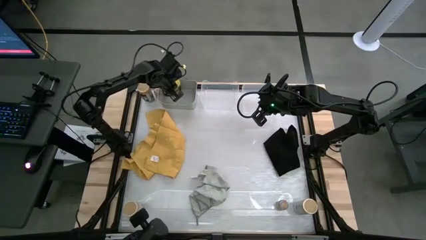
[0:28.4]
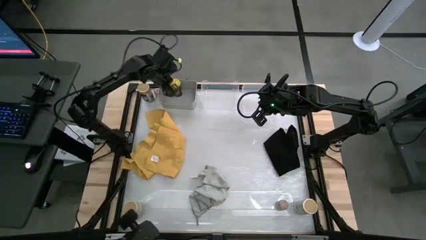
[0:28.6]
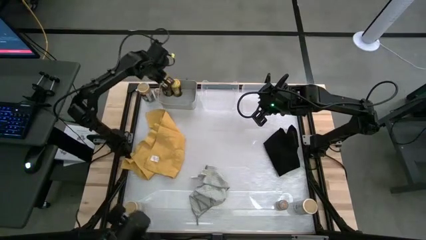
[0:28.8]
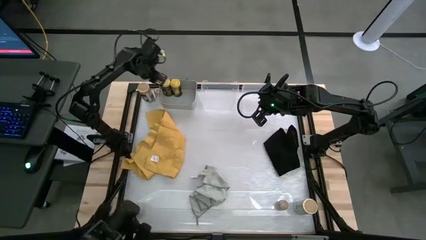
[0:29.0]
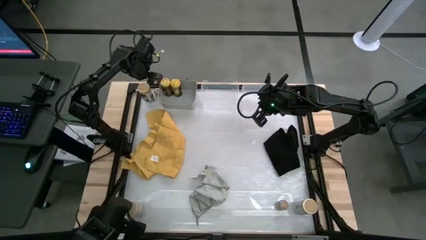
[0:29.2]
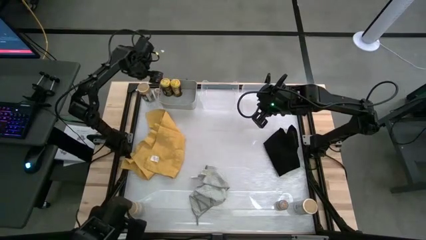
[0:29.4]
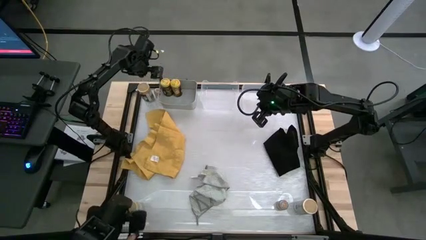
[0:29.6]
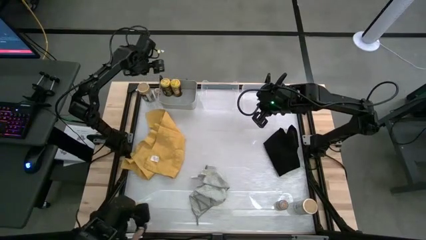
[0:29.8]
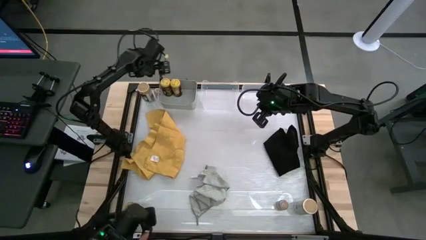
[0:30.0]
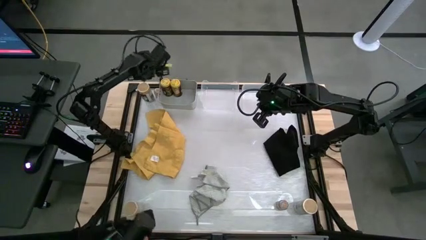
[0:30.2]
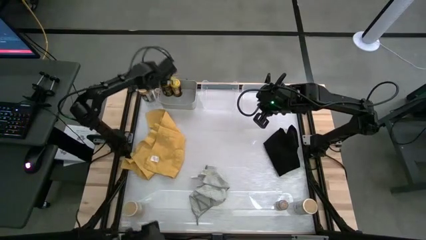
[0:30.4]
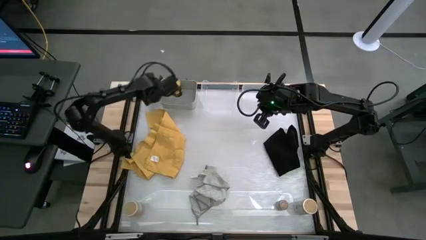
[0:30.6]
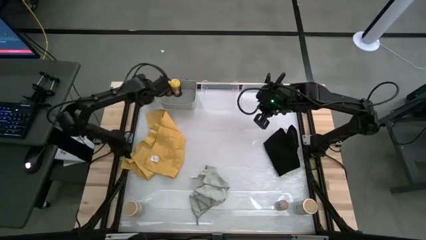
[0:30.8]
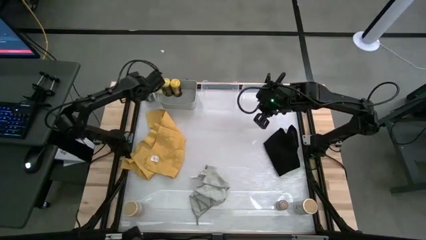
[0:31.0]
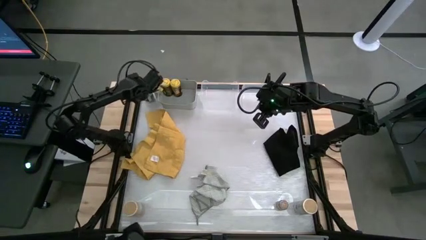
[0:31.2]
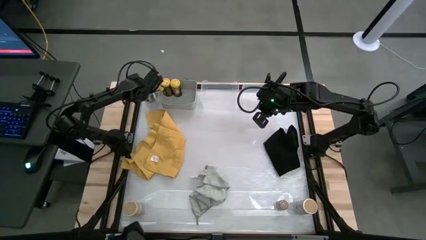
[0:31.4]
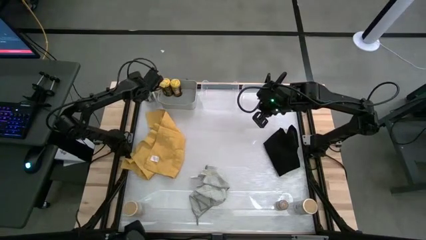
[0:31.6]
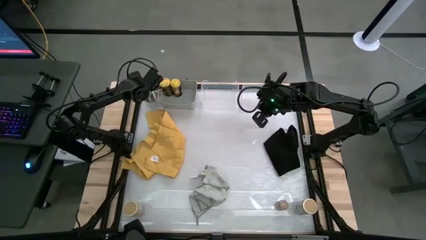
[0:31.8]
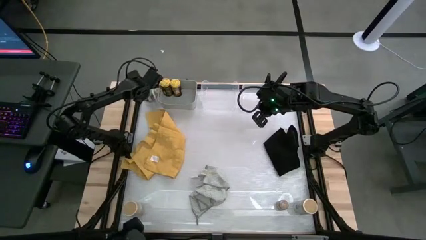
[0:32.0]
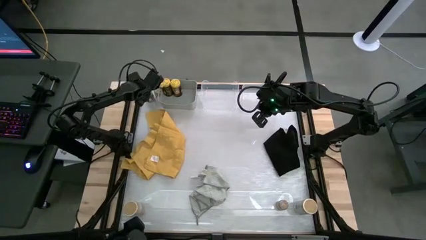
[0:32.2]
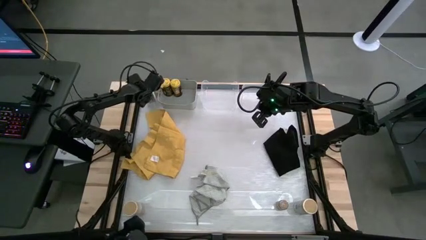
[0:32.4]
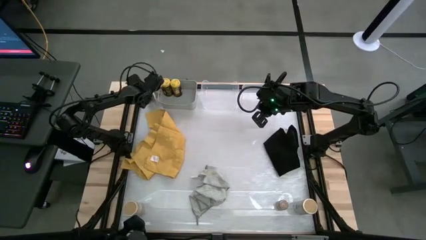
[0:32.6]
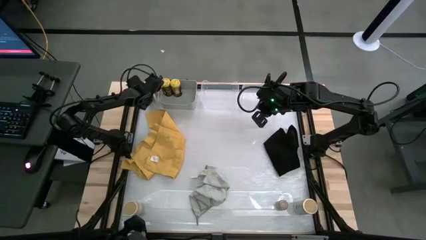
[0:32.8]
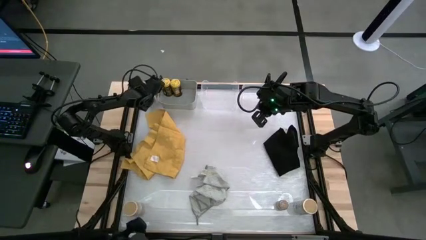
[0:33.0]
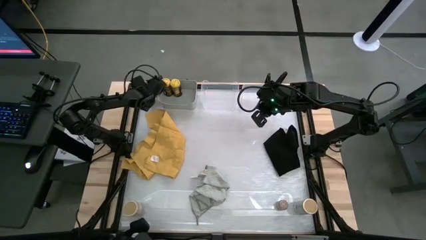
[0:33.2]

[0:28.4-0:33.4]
Task: Sort spices by type
Put the top left gold seasoning bottle into the right transparent bin

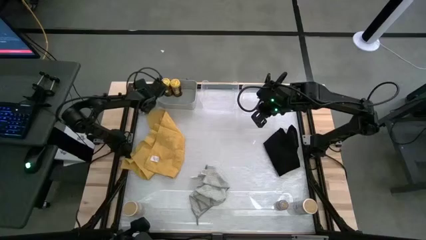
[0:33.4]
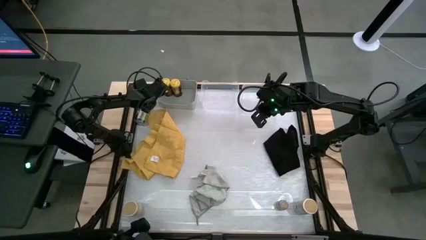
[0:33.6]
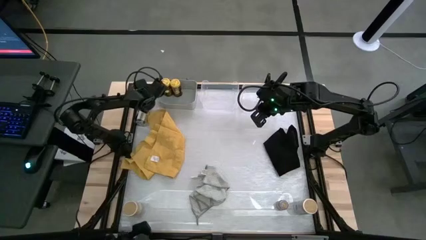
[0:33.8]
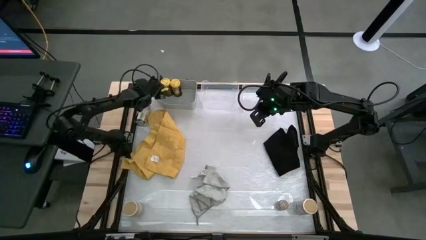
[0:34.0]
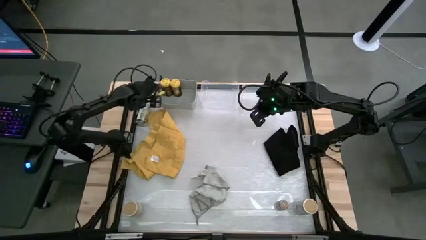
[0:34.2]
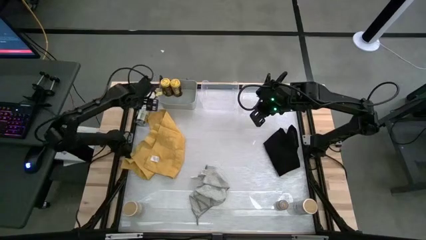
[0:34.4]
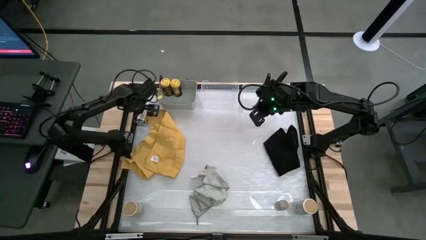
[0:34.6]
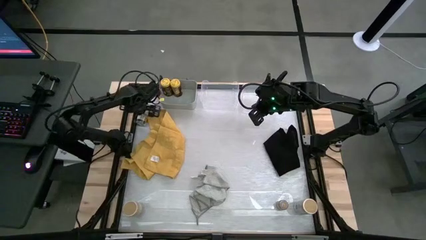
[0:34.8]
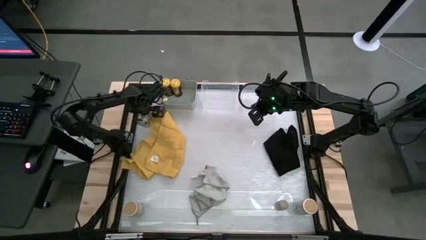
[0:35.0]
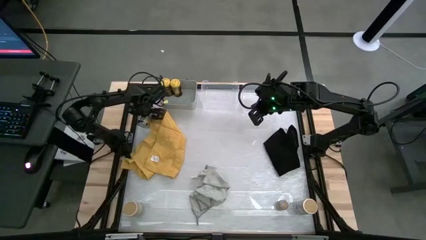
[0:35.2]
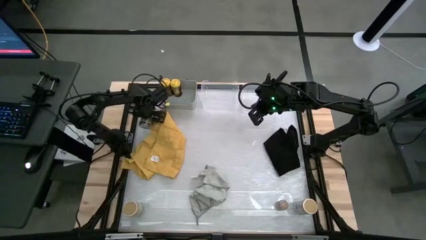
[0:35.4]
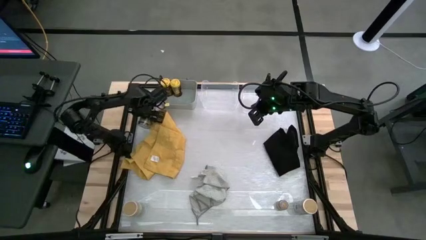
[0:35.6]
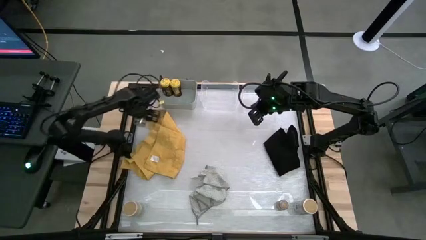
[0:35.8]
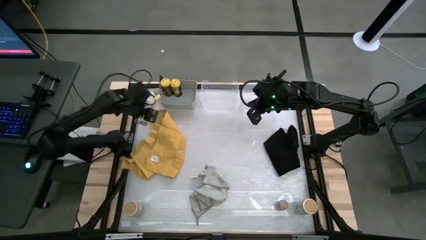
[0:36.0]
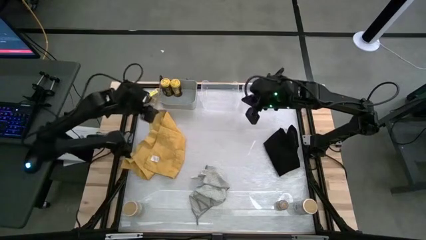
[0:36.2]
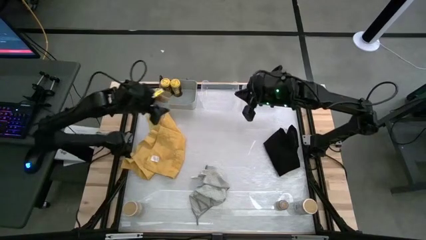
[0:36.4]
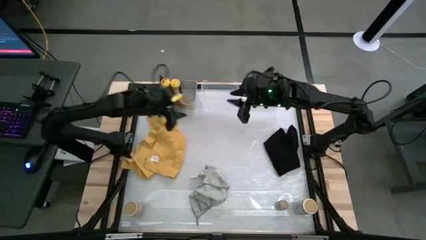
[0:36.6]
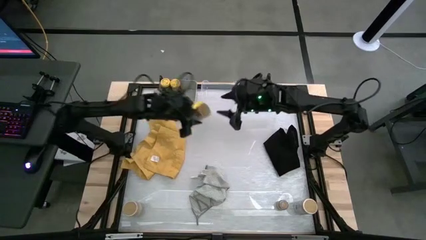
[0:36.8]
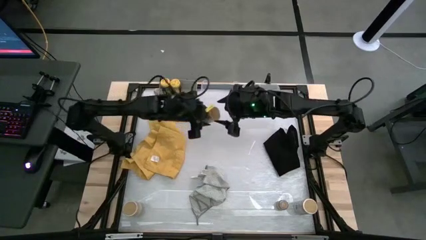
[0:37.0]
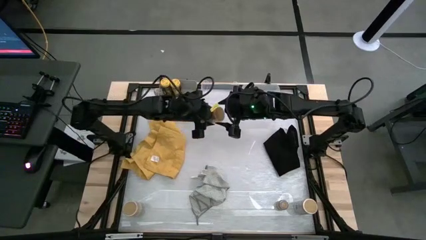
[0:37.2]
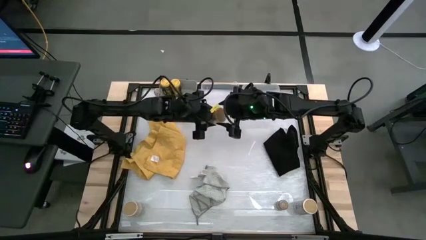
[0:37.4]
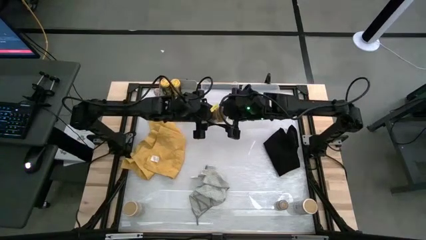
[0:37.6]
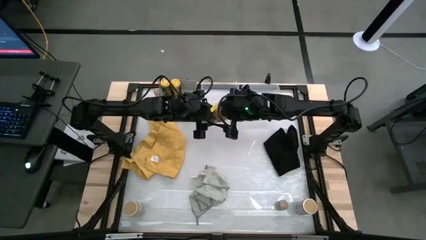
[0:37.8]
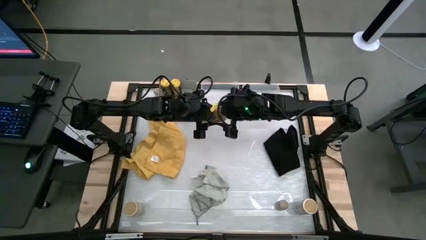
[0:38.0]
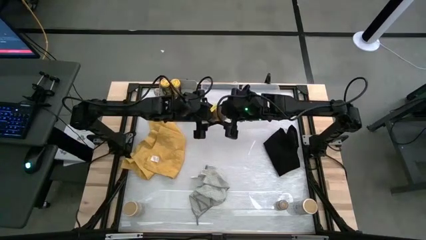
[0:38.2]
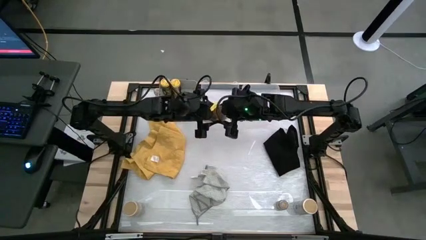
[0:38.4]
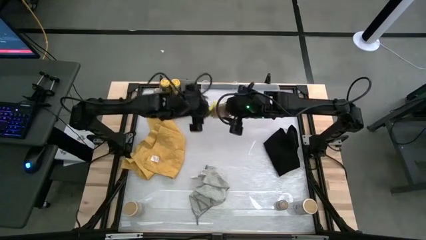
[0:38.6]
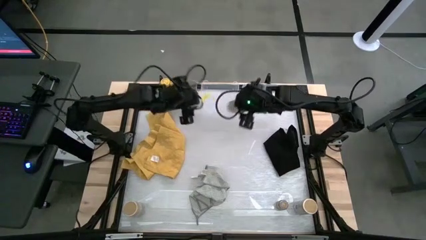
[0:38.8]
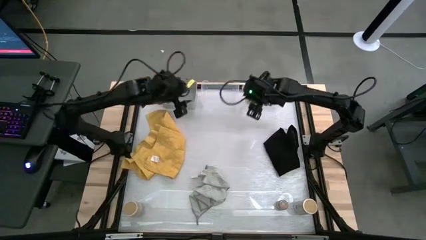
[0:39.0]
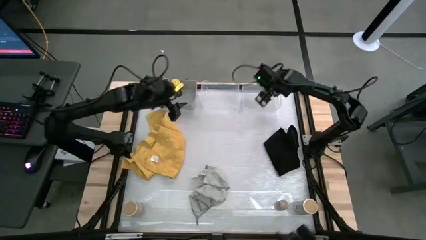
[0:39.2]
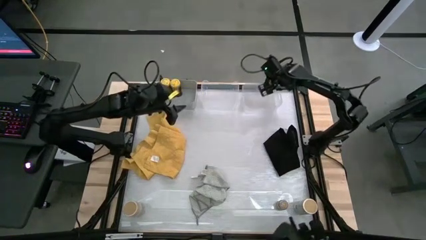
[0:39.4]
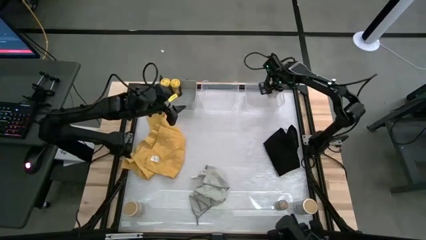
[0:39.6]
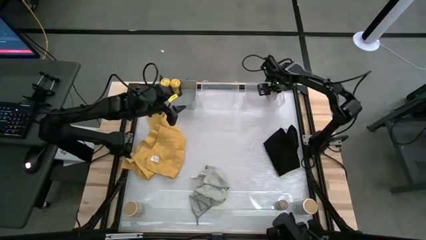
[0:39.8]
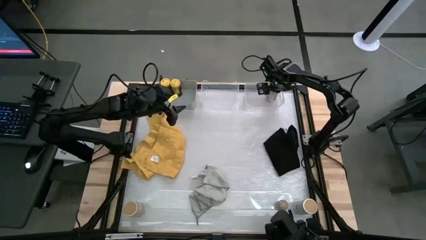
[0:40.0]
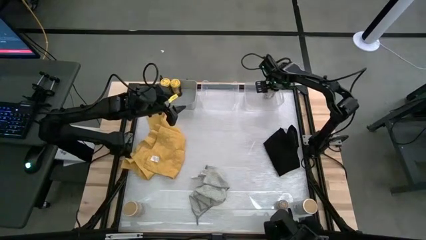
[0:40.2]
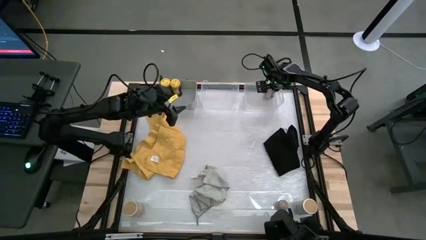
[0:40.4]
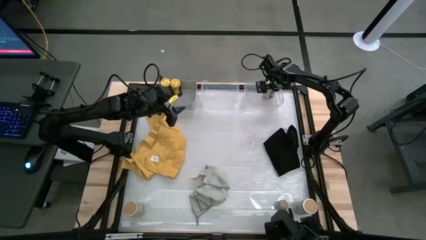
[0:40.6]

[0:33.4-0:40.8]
Put the top left gold seasoning bottle into the right transparent bin

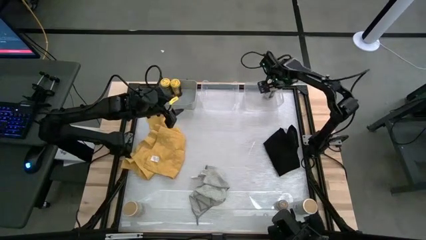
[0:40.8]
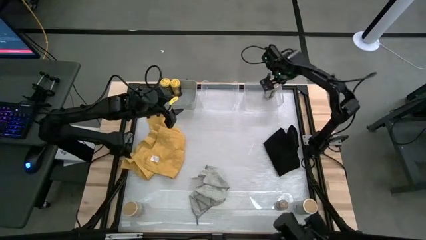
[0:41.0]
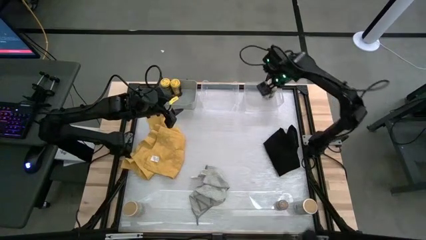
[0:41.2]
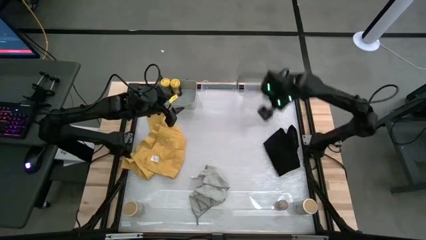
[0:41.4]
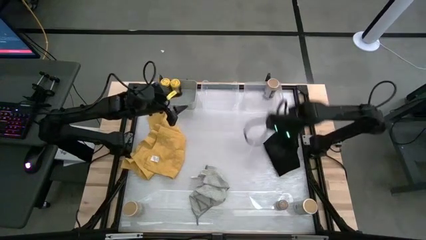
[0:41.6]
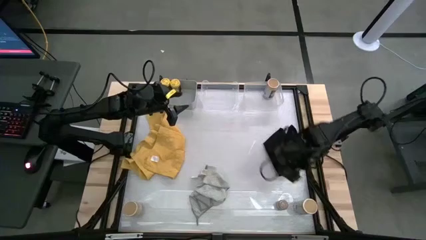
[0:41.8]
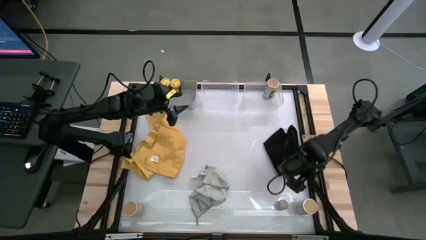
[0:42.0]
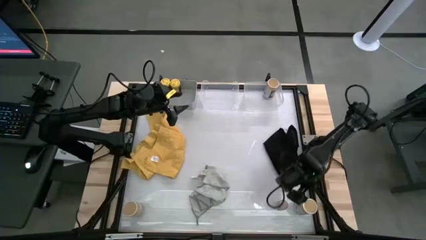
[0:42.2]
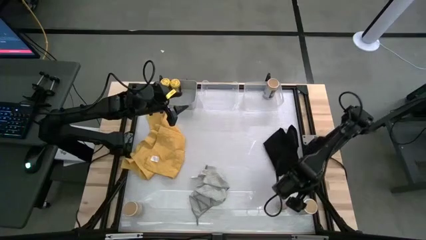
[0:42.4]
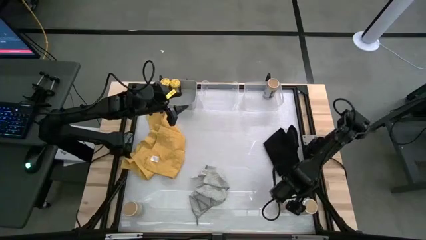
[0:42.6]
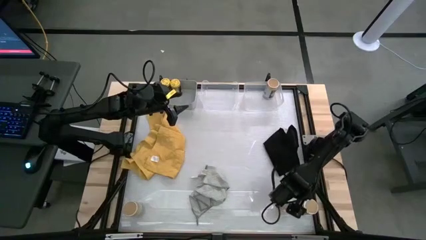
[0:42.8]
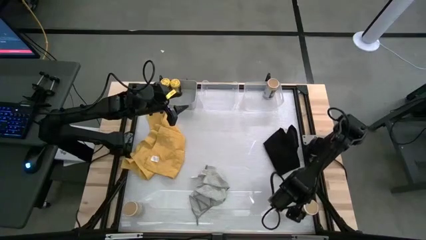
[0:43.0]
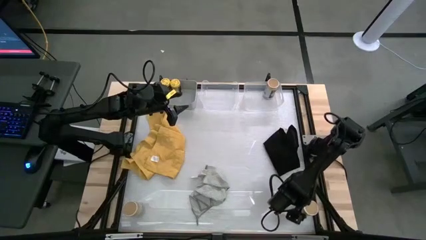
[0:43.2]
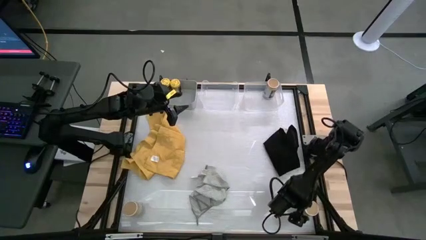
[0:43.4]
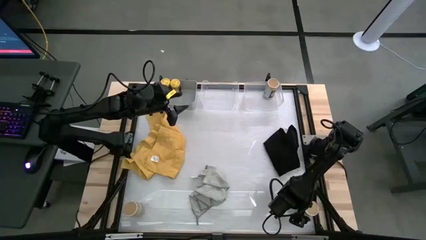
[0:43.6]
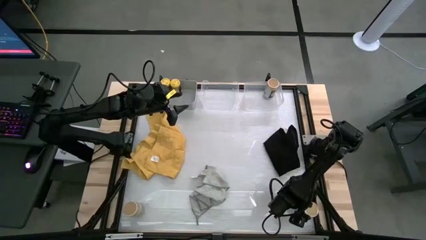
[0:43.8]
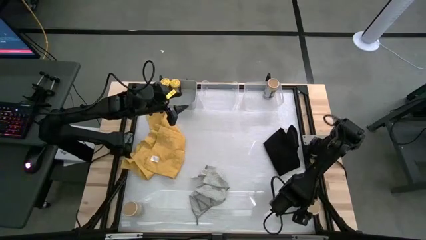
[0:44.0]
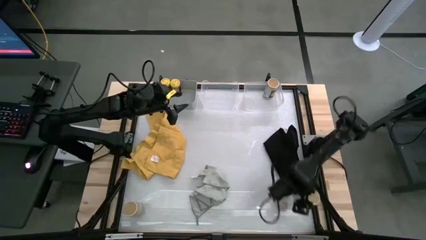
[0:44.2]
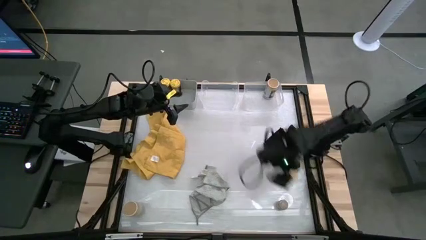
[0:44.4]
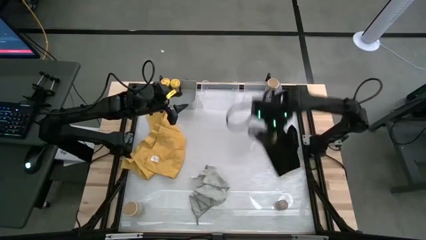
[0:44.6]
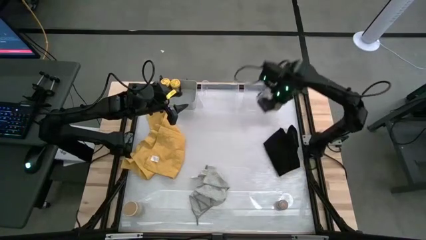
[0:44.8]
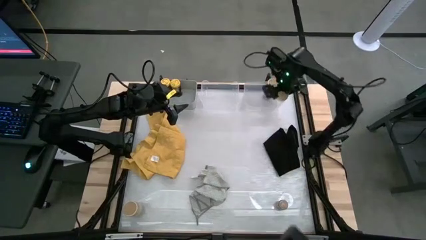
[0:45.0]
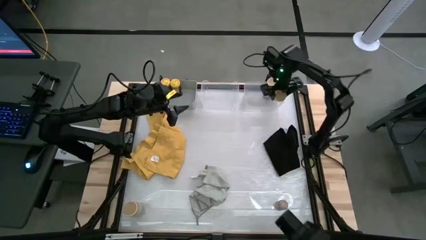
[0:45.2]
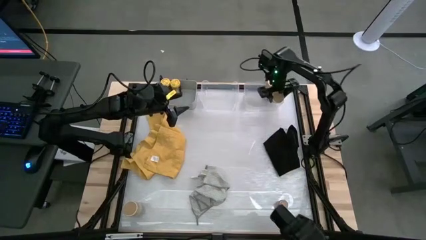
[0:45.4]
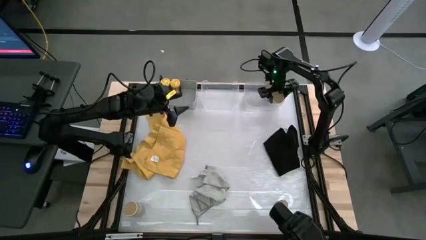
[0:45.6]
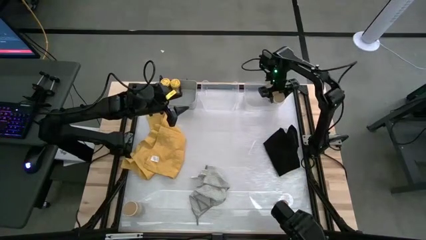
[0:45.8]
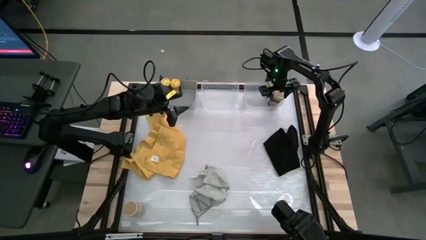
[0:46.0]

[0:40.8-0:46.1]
Put the right gold seasoning bottle into the right transparent bin
